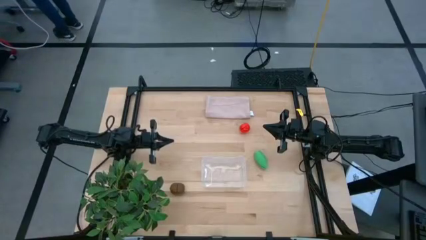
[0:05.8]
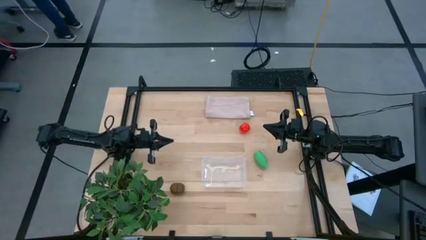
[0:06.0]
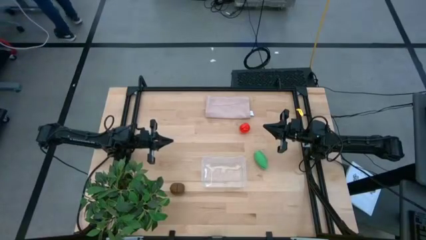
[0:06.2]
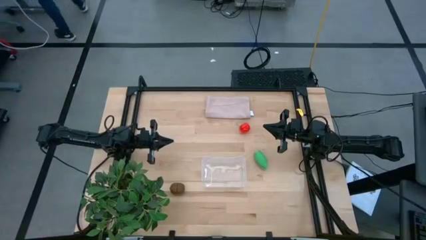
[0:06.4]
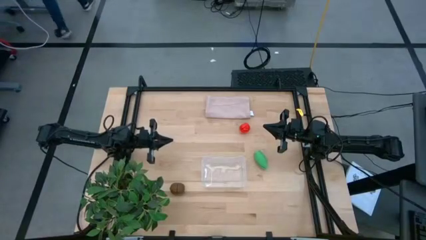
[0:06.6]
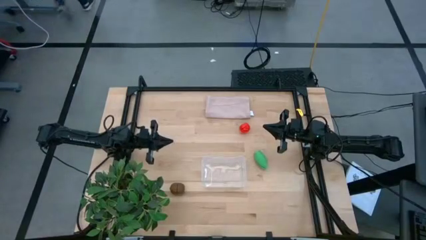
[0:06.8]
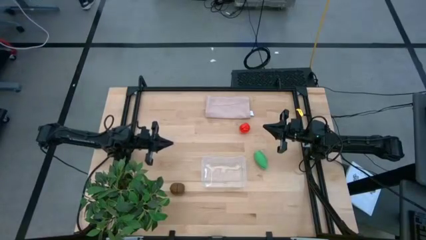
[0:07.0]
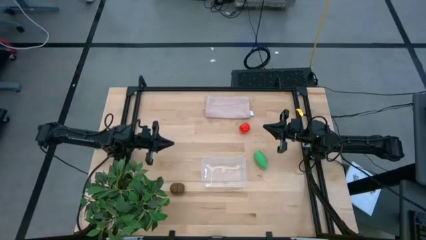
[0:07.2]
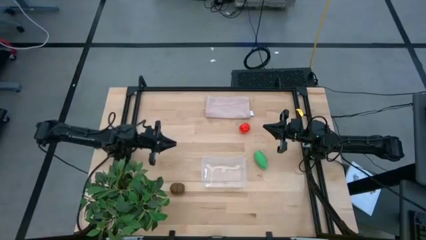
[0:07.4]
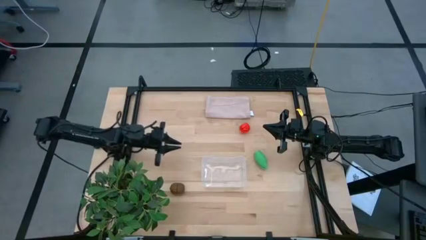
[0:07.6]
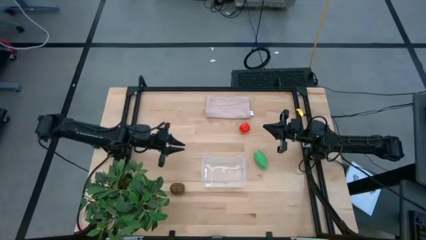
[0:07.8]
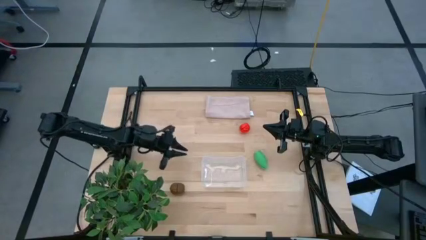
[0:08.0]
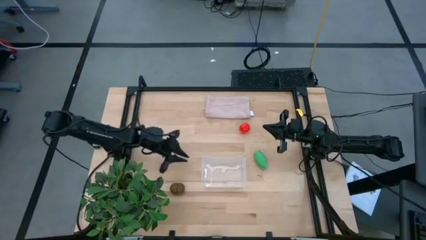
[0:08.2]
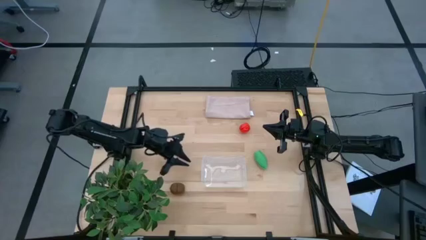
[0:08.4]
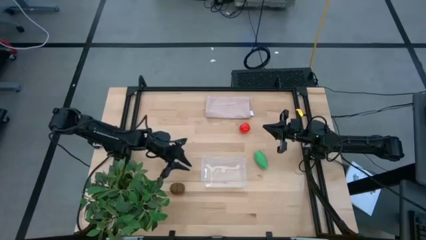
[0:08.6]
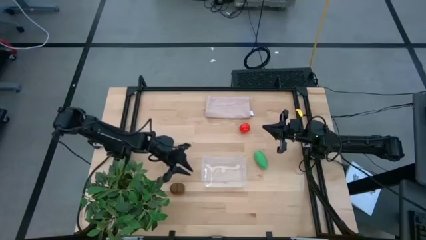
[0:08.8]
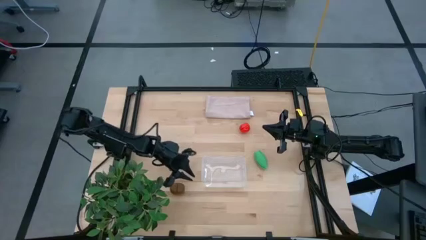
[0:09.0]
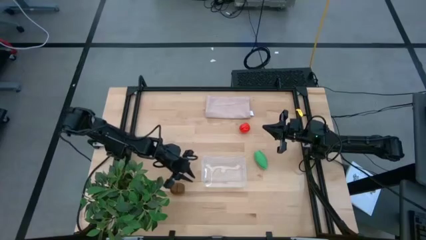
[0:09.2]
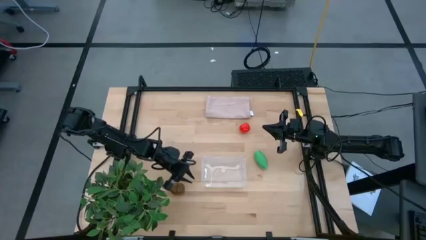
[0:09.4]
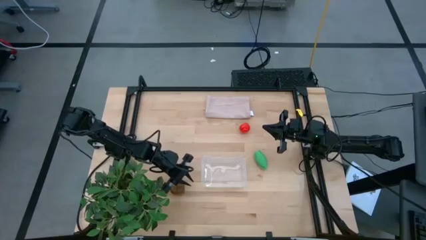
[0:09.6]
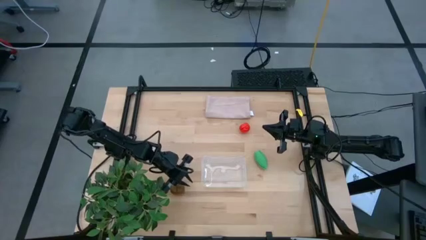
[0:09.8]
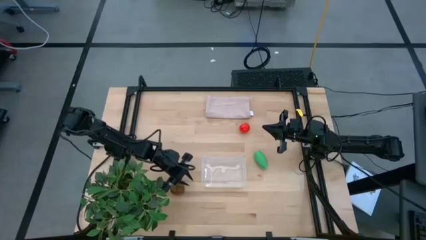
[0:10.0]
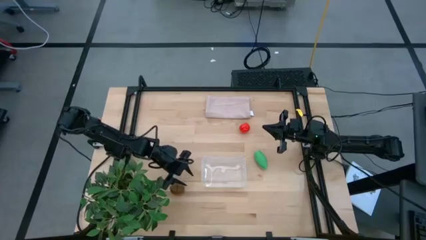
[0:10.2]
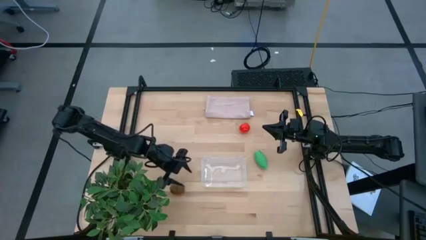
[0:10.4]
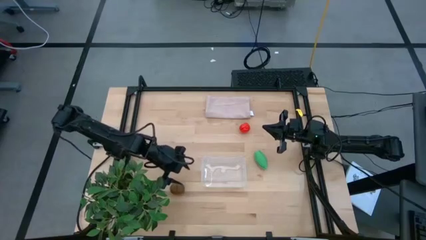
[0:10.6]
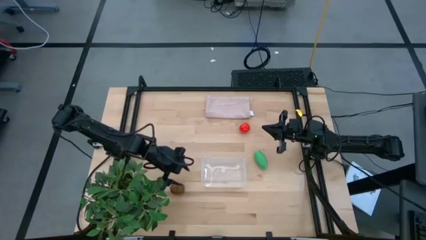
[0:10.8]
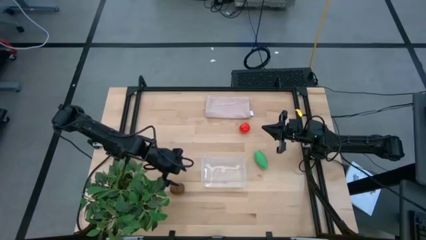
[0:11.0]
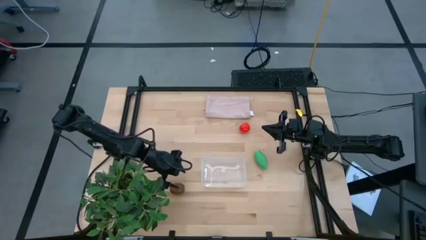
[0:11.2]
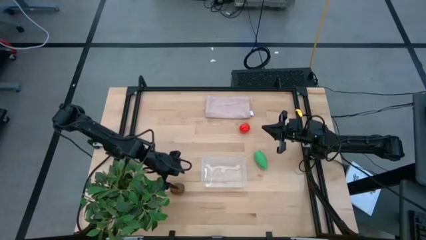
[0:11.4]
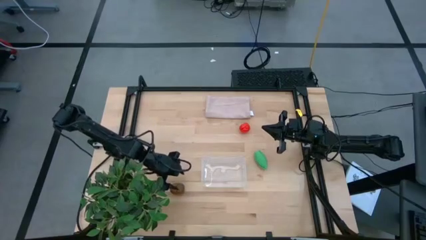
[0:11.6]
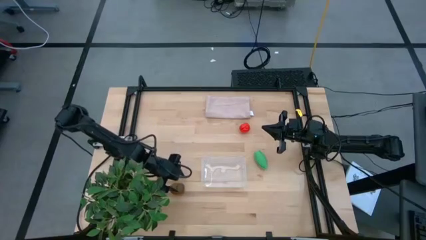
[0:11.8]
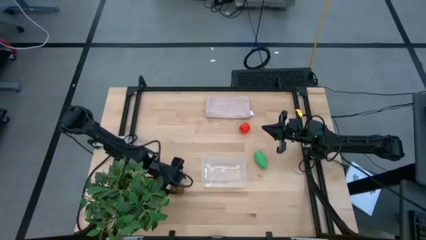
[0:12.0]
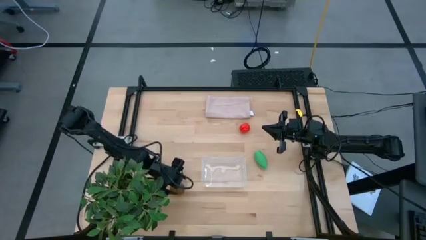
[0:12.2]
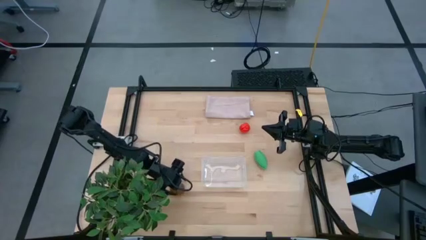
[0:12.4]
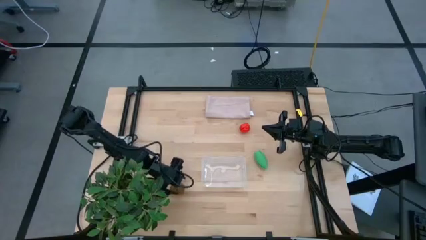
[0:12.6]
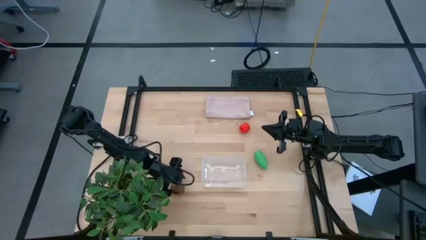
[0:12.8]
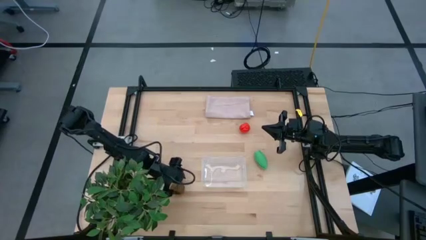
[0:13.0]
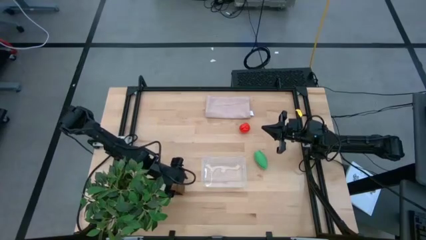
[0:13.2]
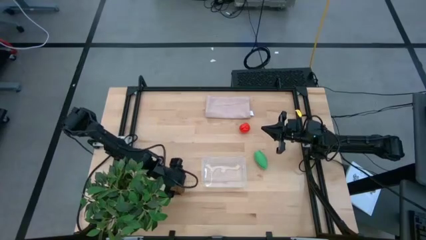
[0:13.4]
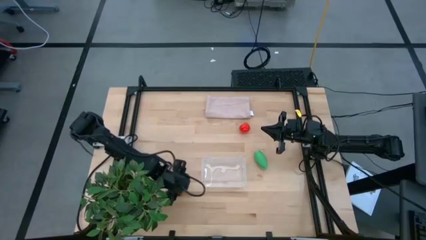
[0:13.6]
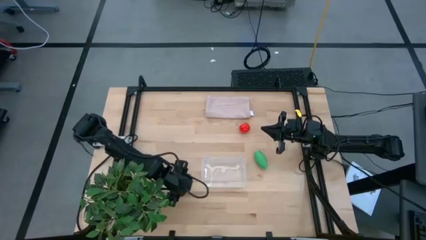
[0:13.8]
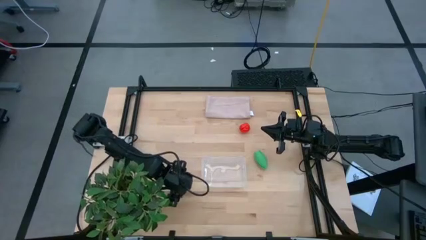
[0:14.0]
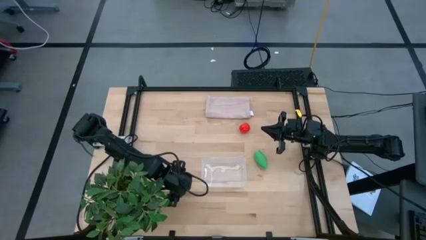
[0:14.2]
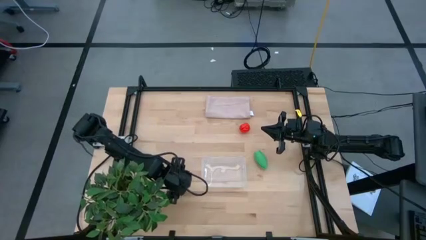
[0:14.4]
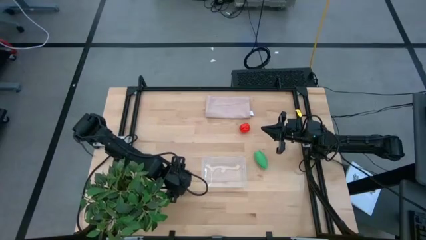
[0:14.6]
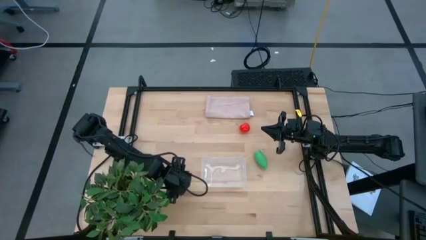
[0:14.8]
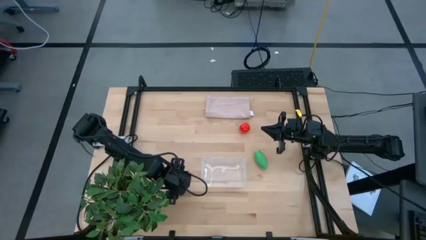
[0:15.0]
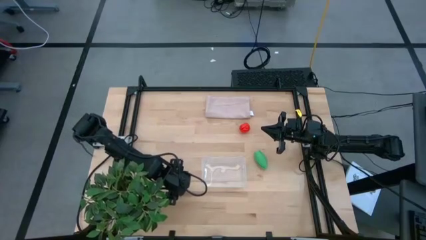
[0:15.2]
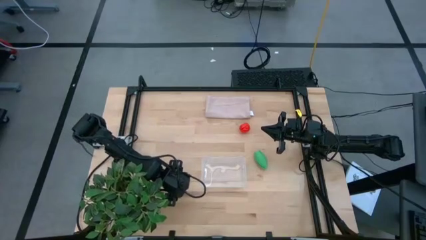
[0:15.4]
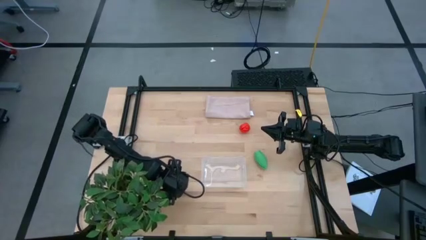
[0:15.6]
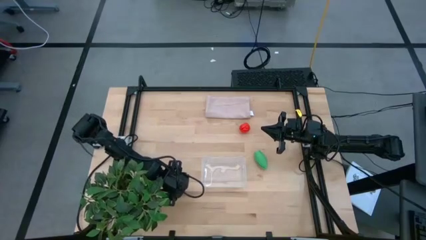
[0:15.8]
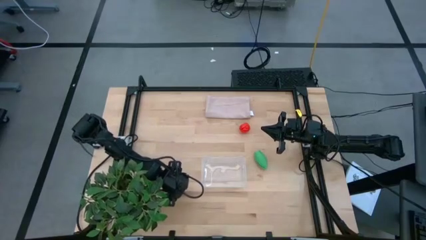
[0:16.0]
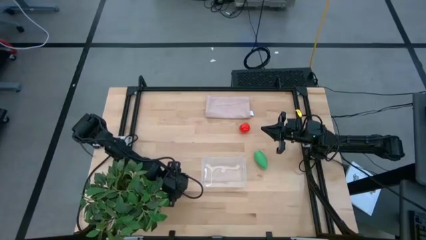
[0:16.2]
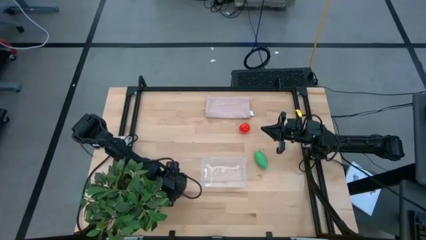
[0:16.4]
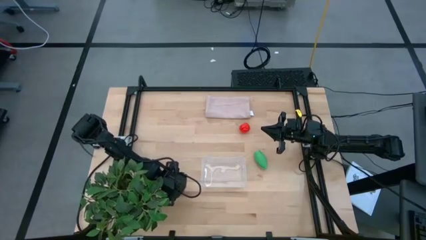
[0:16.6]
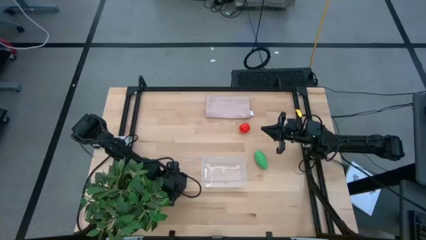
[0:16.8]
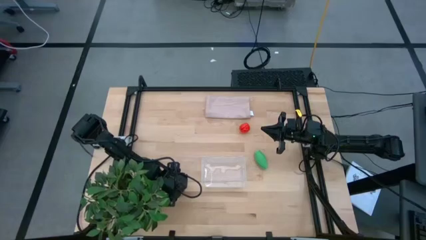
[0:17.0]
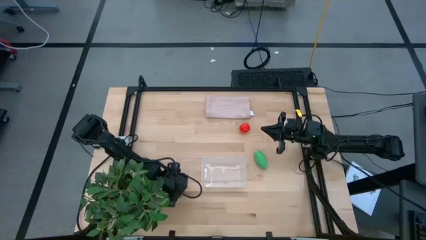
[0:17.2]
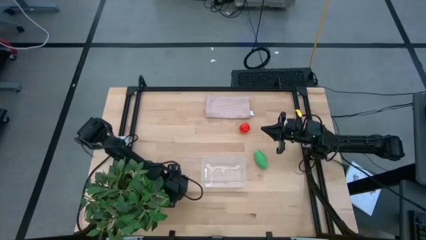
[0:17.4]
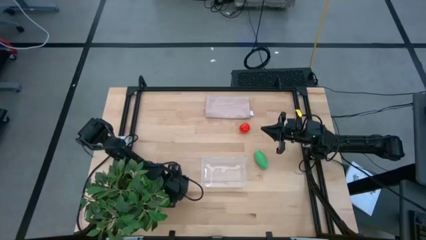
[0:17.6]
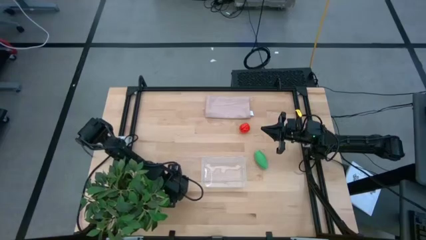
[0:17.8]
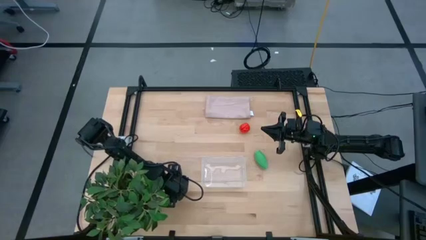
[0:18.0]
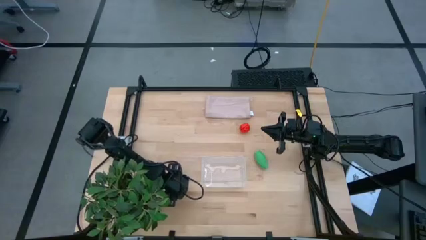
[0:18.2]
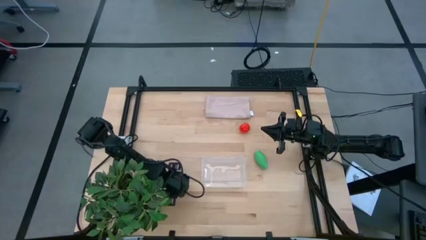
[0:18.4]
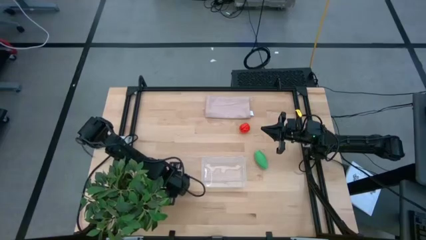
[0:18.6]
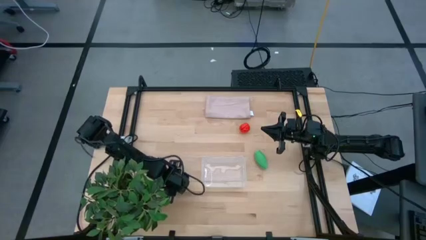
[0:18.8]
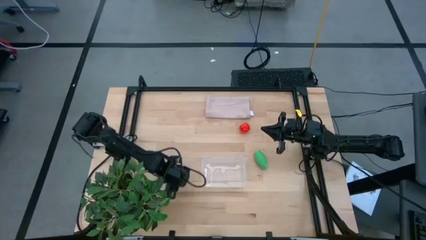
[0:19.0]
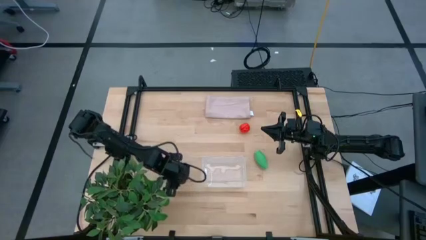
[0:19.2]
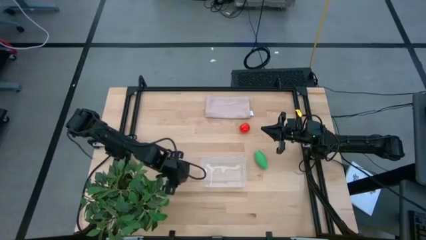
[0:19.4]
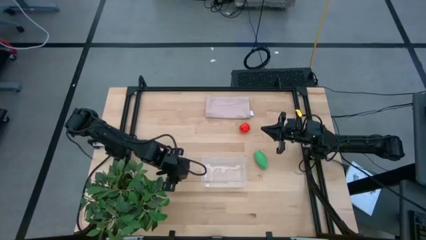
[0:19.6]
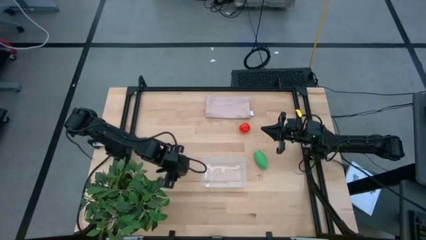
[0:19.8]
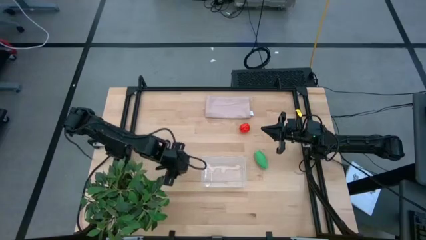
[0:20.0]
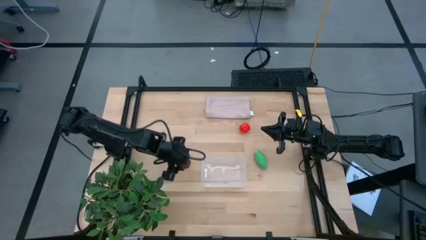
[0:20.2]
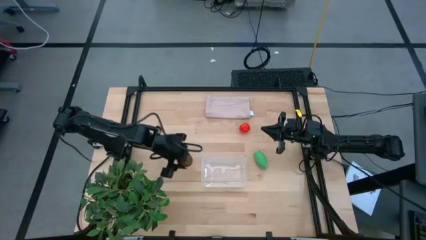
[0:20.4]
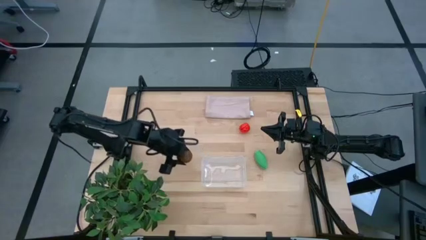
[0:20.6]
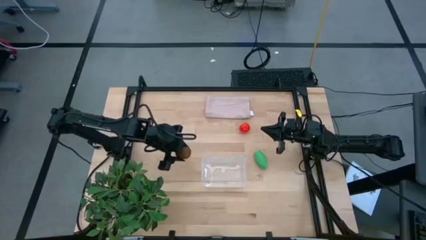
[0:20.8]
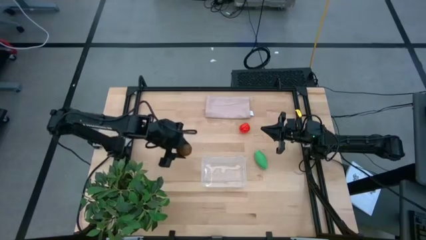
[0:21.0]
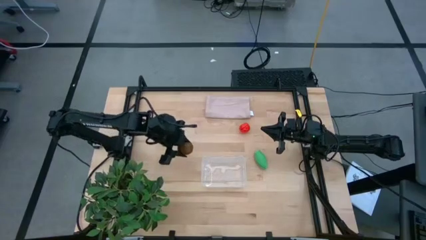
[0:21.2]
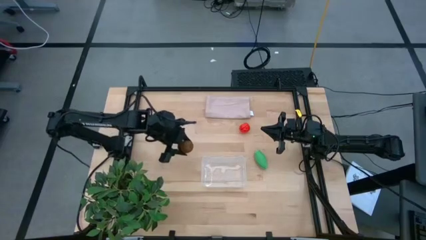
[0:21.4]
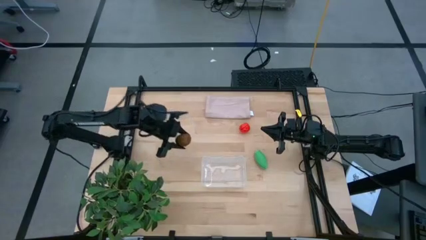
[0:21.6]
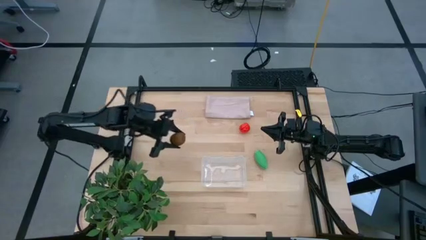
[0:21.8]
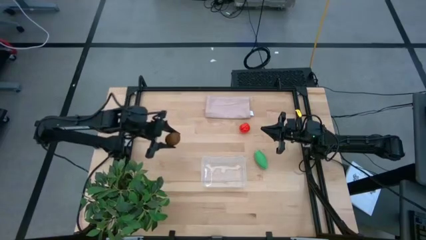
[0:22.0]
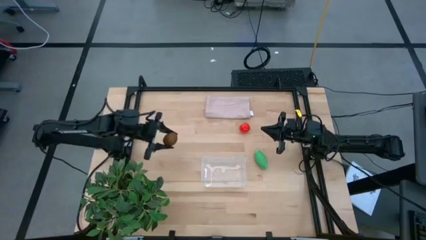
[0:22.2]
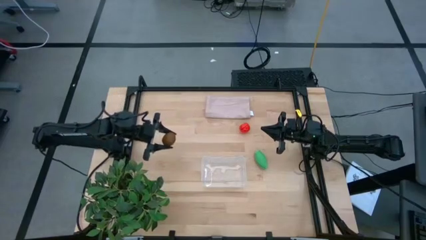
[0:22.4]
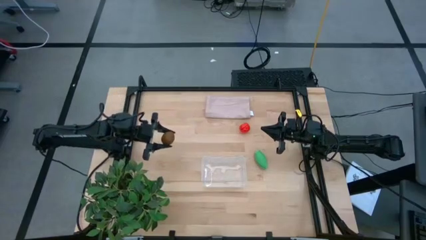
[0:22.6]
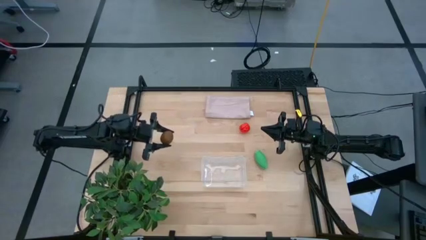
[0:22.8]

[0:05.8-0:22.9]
Task: Pick and placing Produce into tupperware
Put the kiwi into the transparent bin
